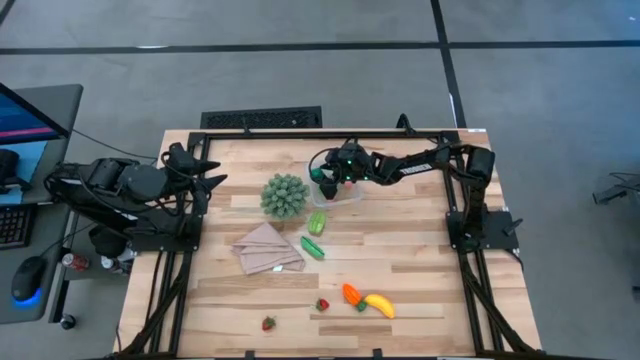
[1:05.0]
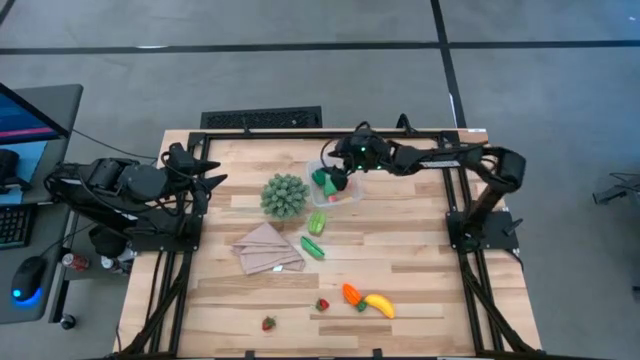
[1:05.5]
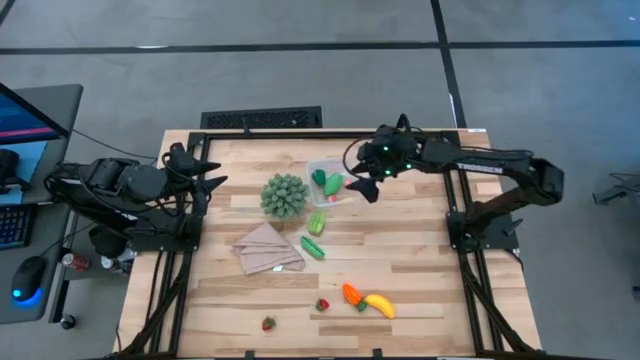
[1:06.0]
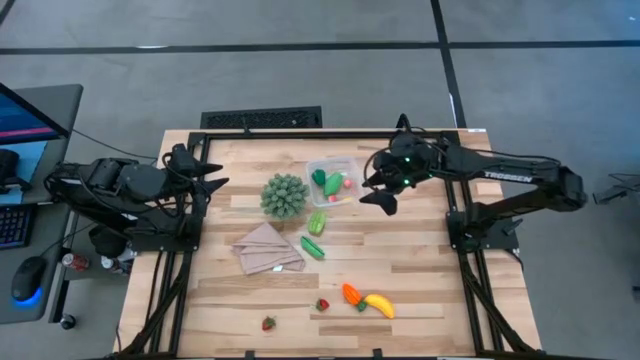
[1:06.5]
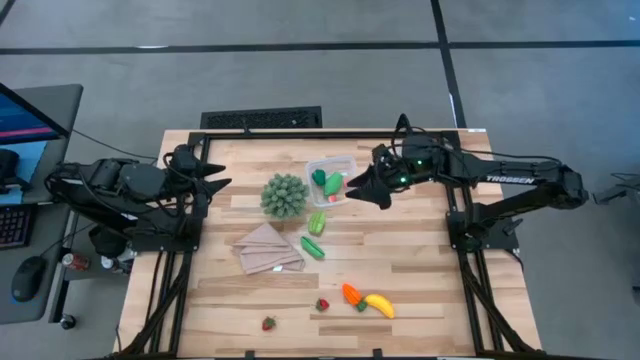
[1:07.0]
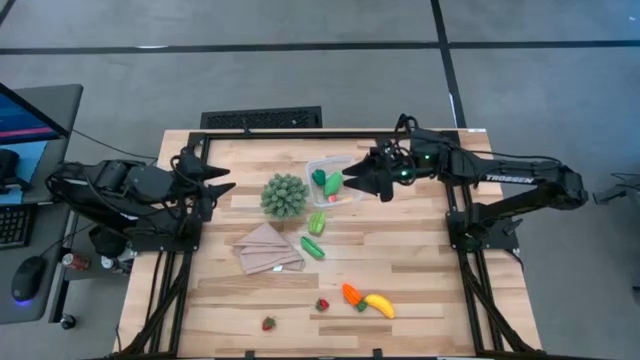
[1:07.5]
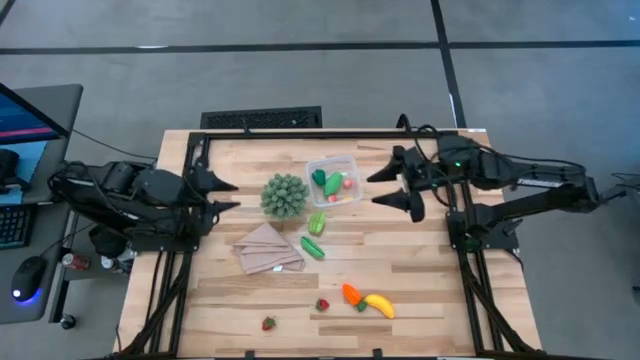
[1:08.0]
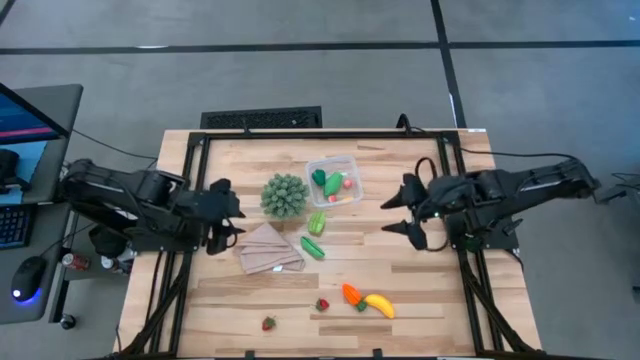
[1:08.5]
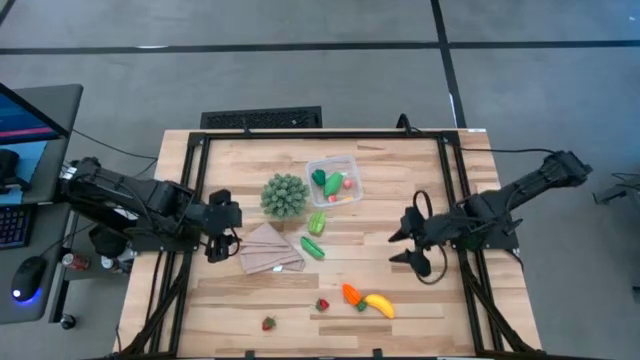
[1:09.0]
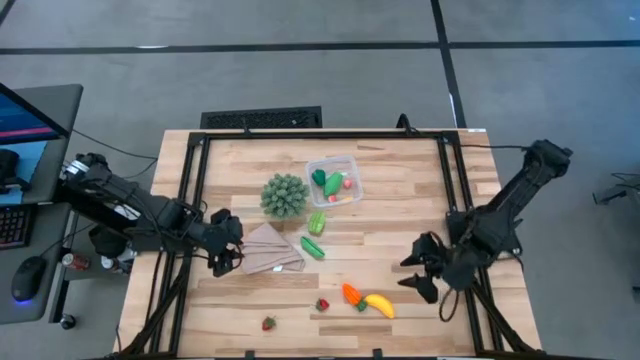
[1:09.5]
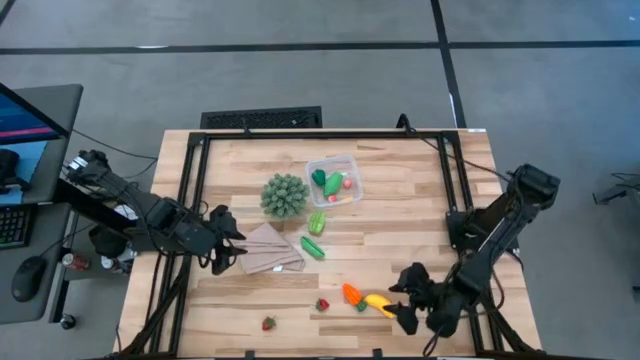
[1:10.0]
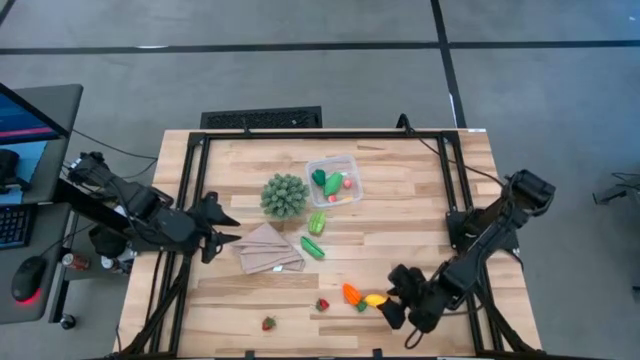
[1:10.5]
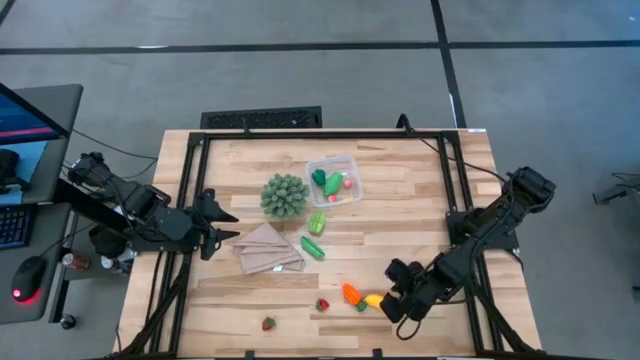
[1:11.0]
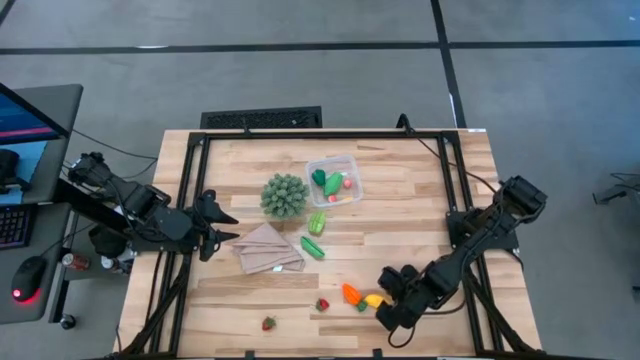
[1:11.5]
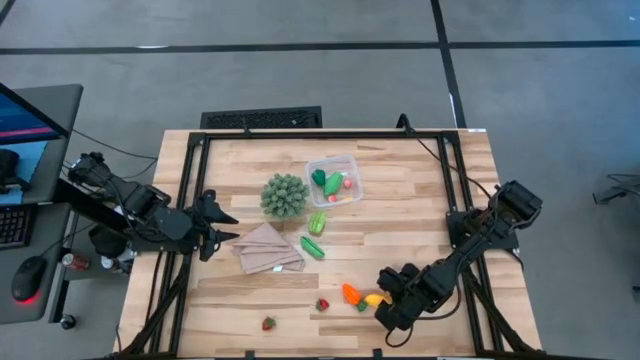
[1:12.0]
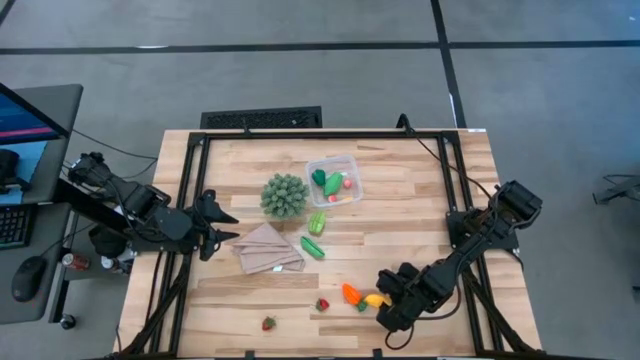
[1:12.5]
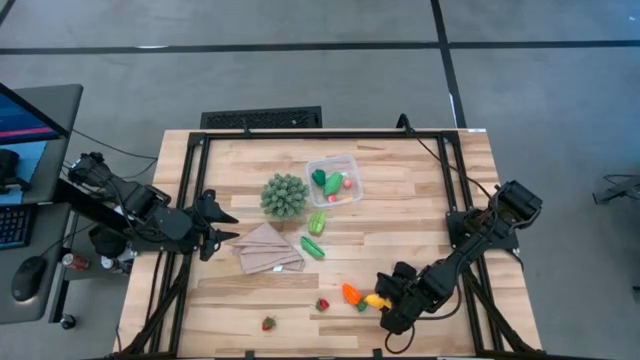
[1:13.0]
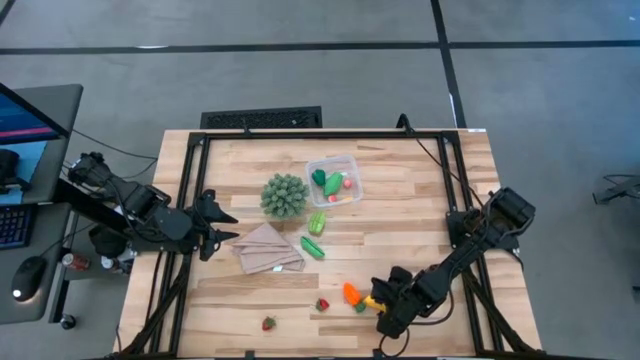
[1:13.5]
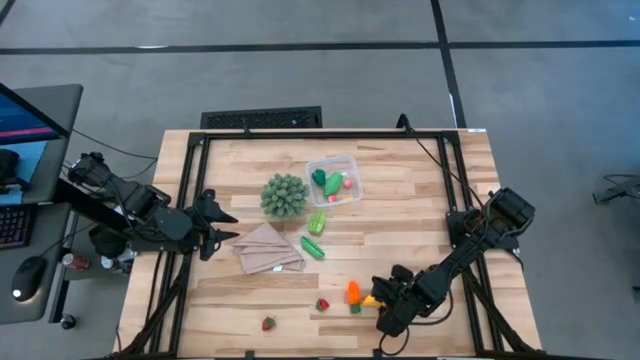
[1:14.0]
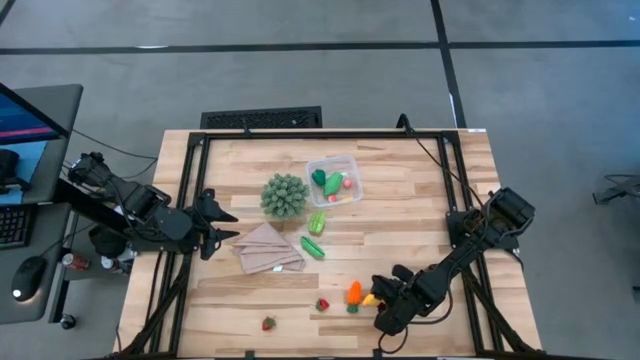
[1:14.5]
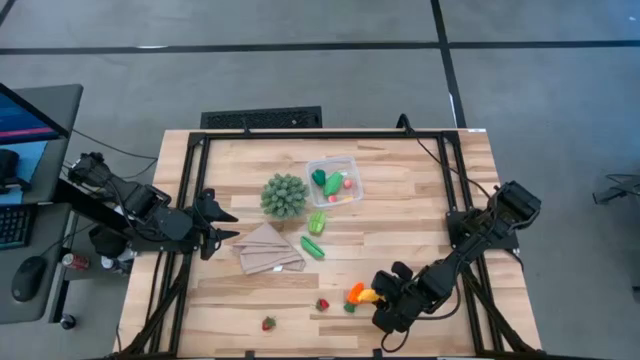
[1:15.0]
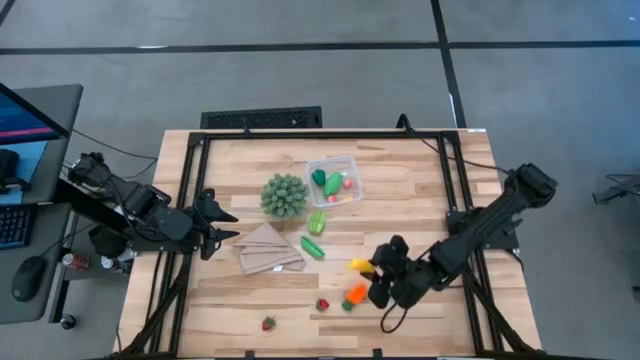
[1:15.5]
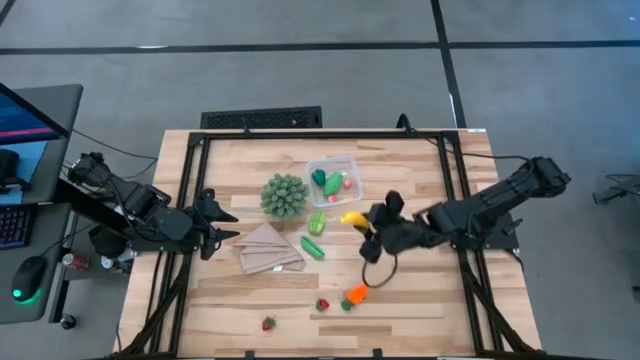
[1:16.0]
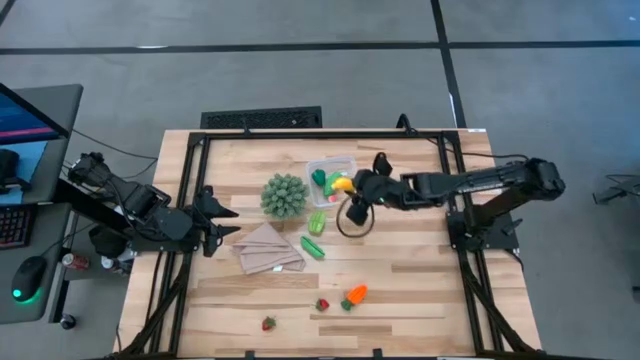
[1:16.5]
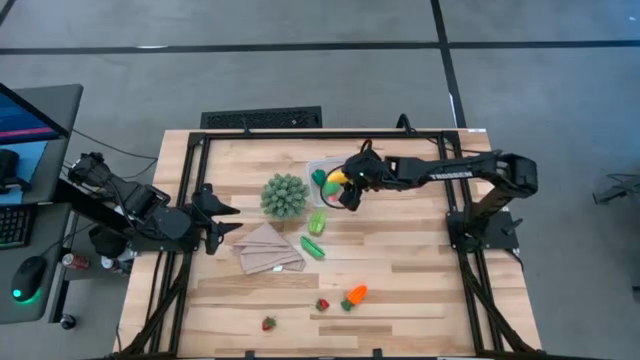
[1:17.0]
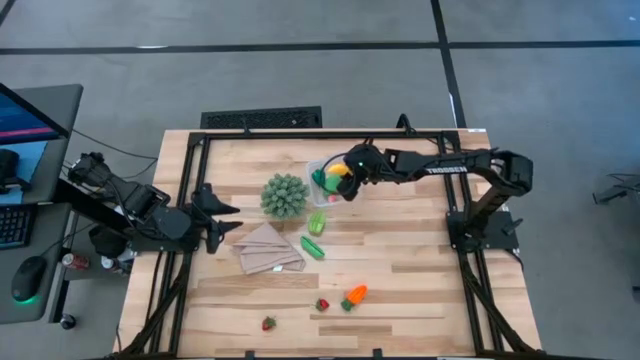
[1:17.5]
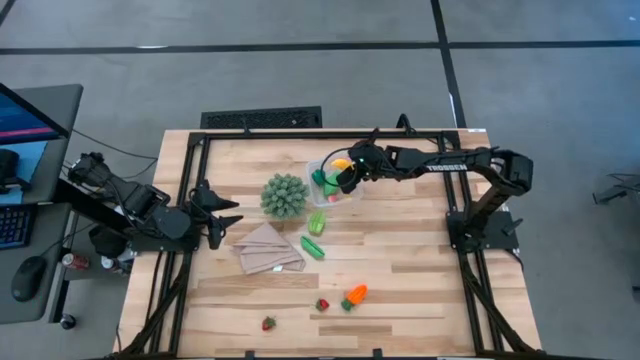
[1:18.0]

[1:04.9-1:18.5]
Task: Pick and placing Produce into tupperware
Put the banana into the transparent bin

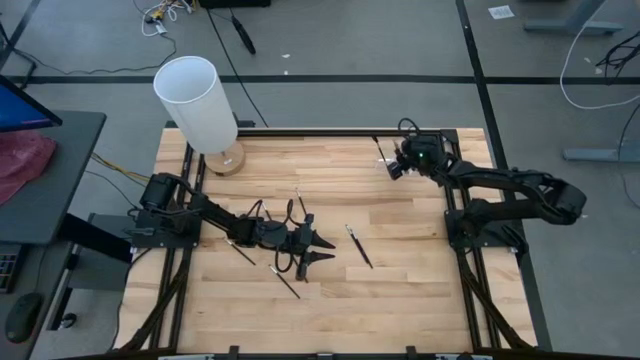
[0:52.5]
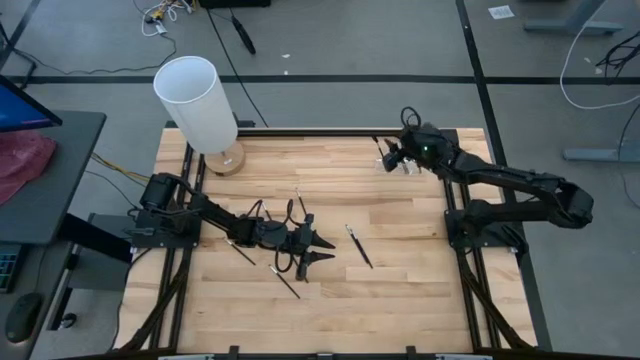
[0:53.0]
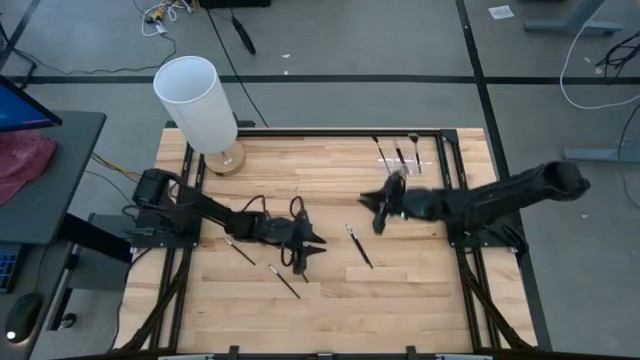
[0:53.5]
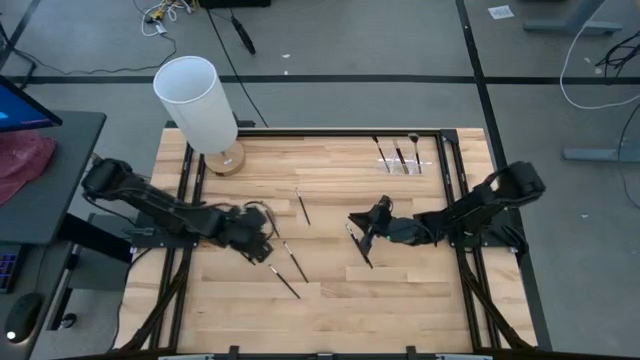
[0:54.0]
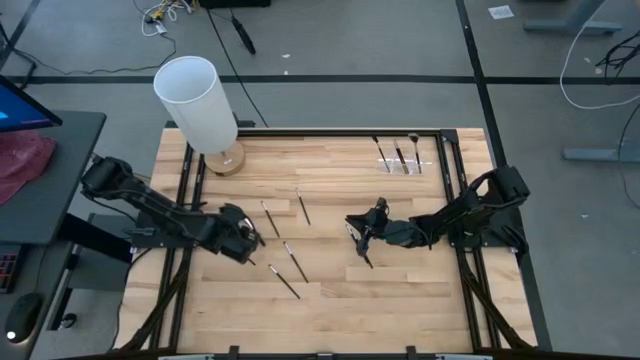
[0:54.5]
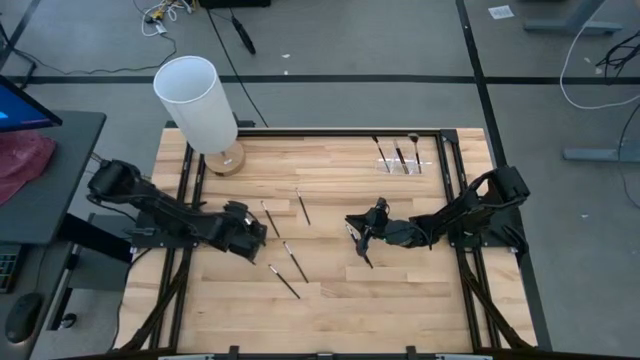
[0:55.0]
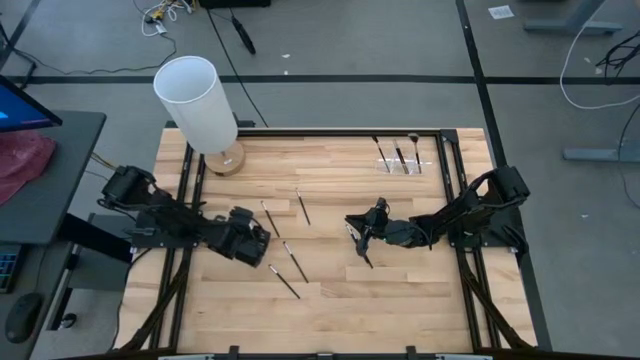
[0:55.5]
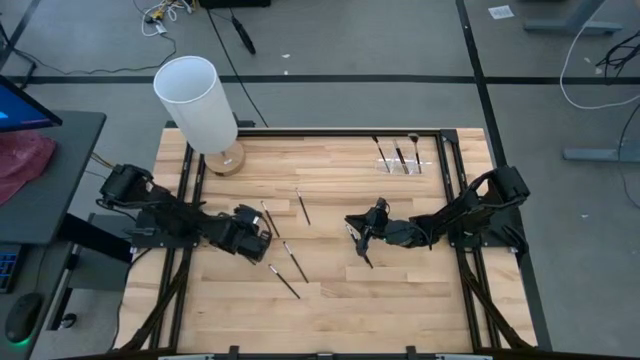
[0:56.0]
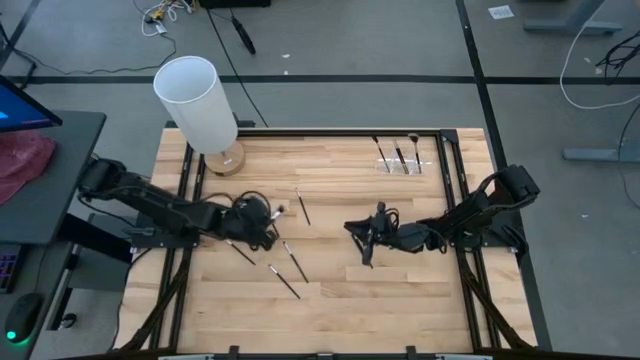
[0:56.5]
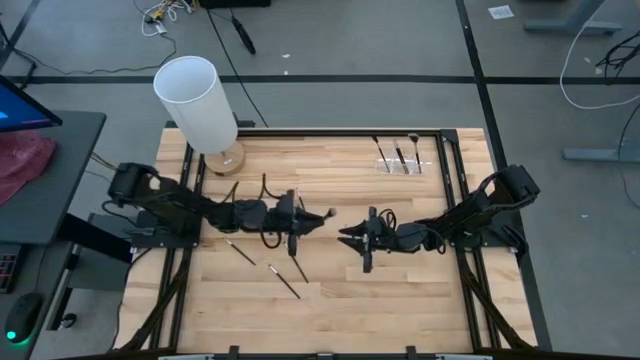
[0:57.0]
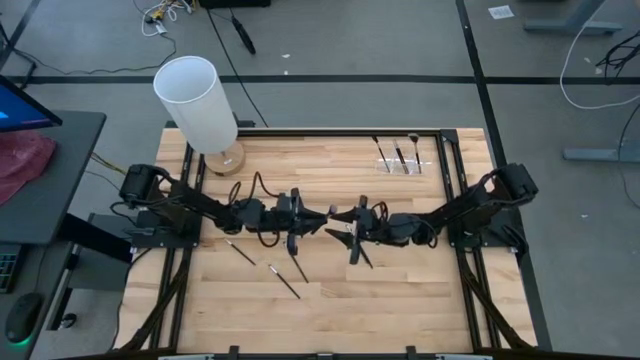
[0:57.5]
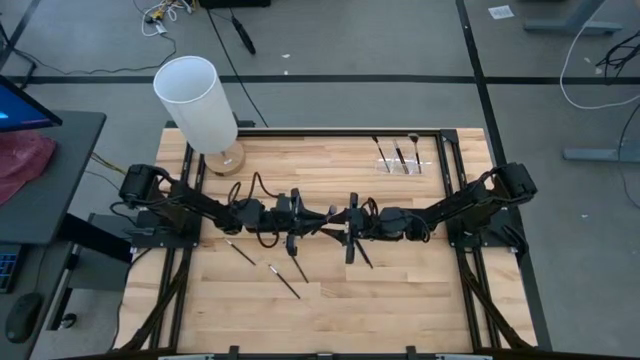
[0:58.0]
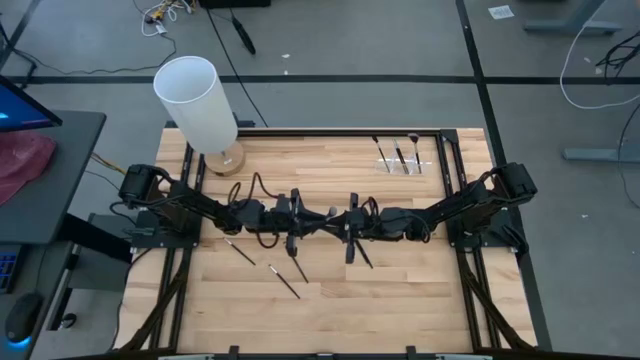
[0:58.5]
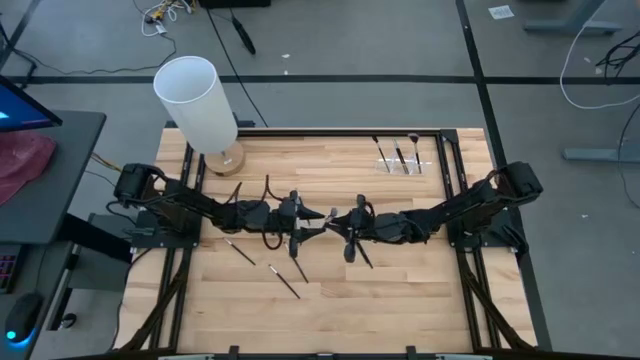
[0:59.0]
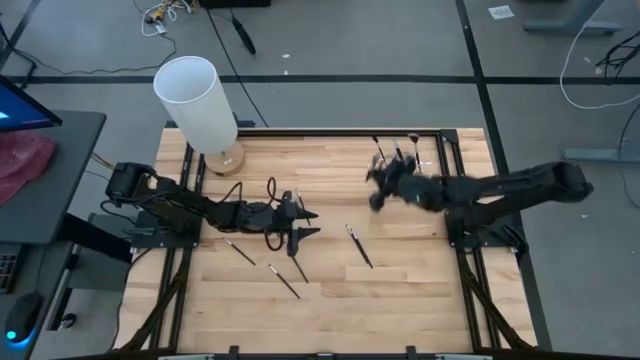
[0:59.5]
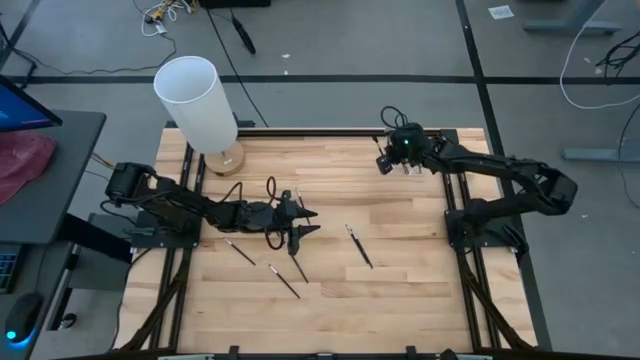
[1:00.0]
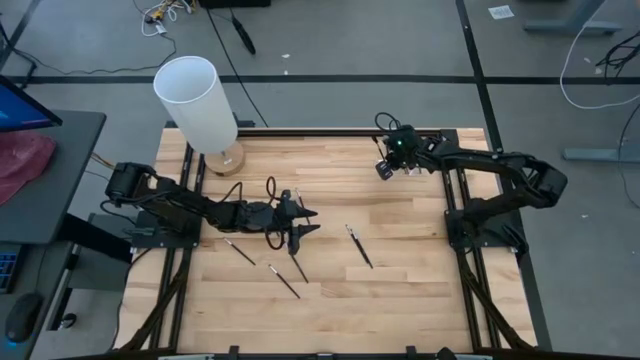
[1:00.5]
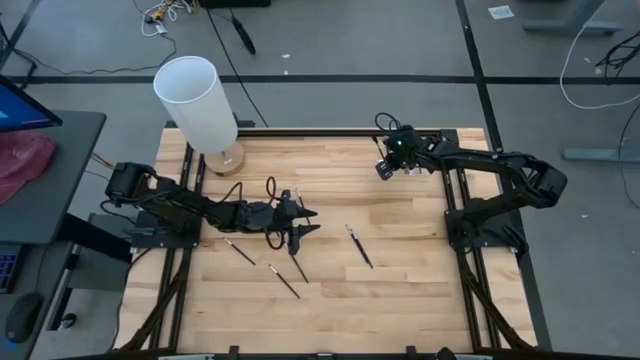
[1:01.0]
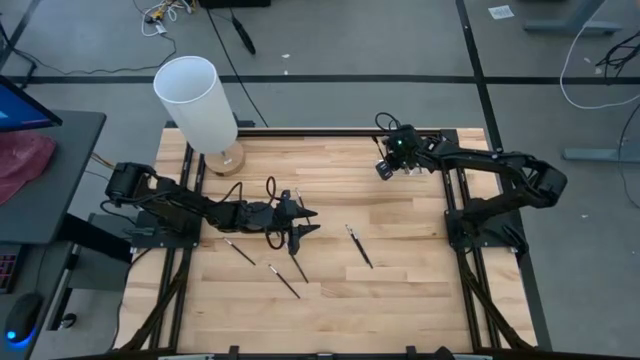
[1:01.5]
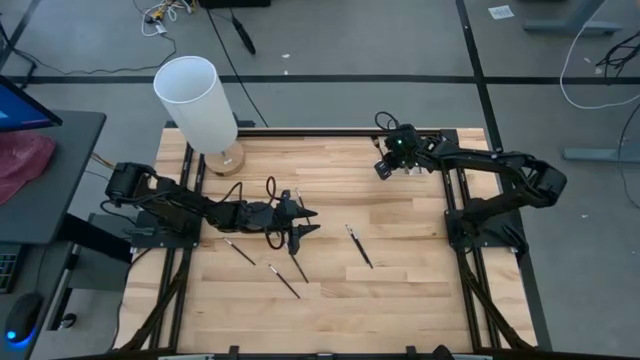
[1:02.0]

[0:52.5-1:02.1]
Task: Put items in baskets/containers
Put the powder brush into the transparent organizer
